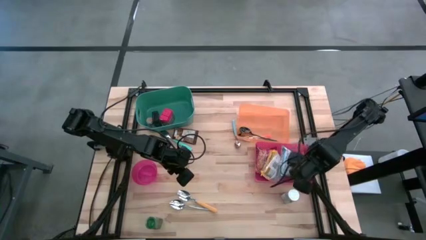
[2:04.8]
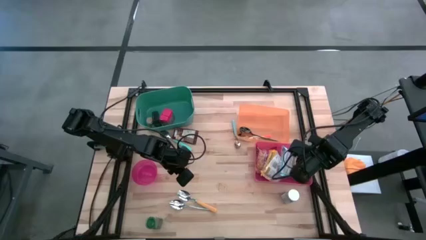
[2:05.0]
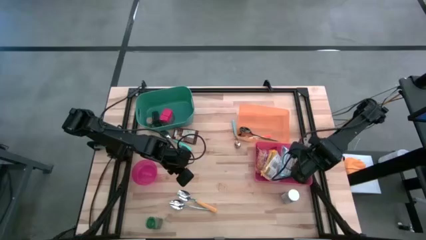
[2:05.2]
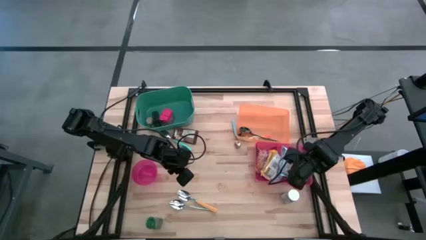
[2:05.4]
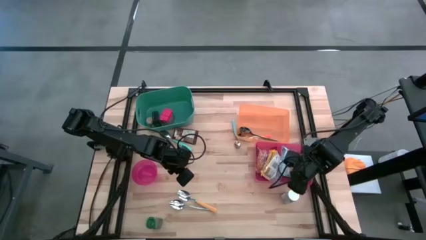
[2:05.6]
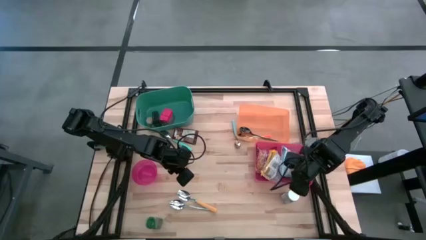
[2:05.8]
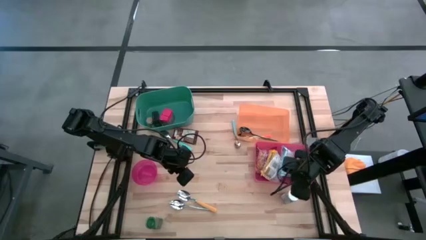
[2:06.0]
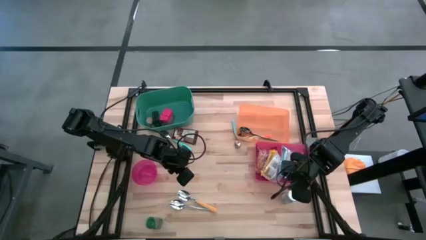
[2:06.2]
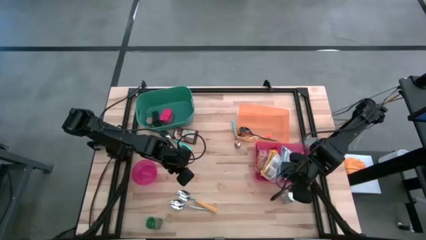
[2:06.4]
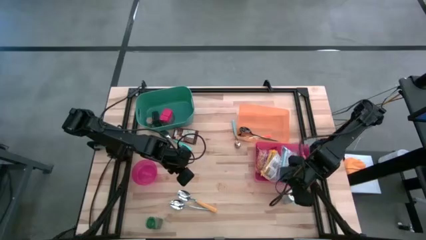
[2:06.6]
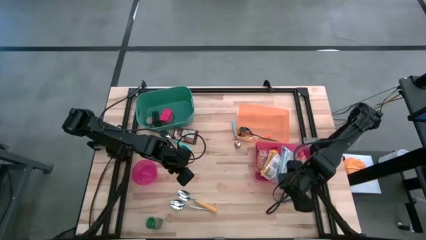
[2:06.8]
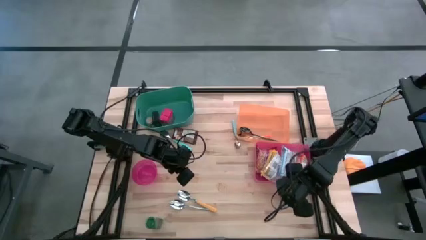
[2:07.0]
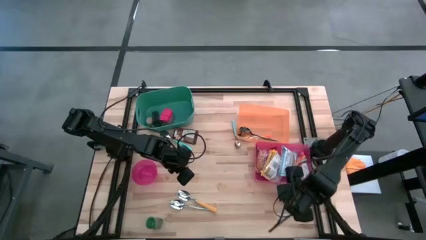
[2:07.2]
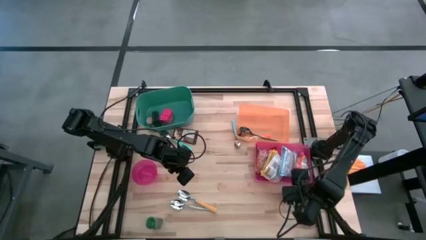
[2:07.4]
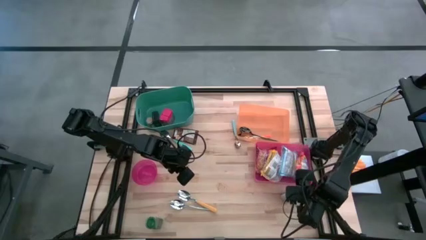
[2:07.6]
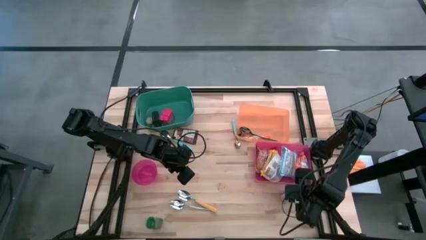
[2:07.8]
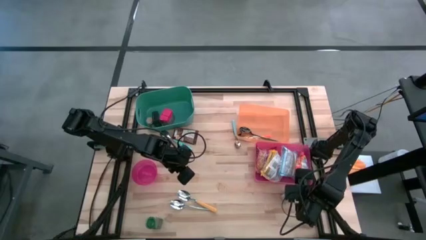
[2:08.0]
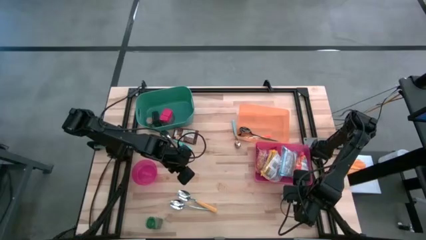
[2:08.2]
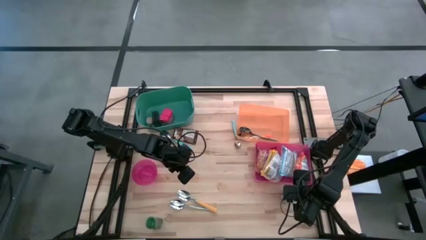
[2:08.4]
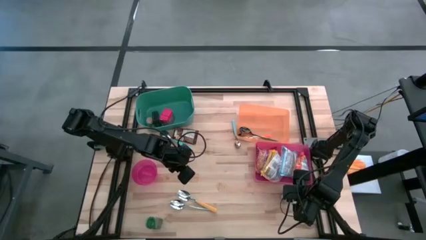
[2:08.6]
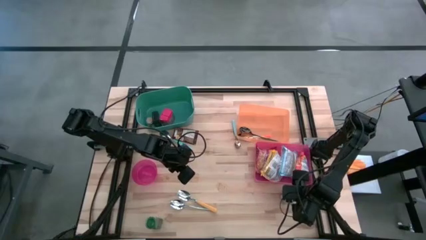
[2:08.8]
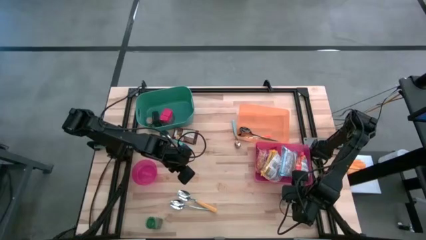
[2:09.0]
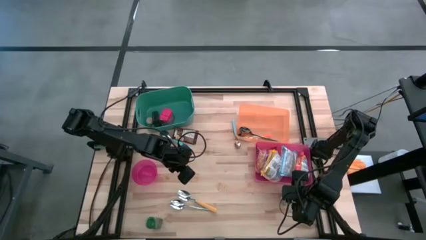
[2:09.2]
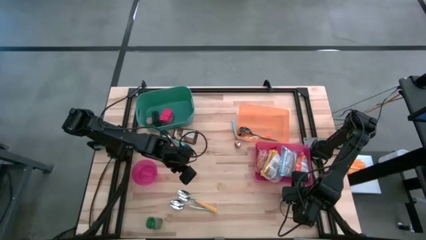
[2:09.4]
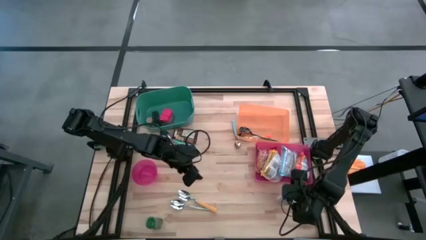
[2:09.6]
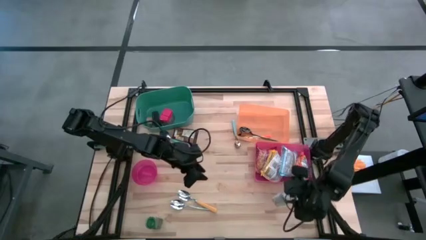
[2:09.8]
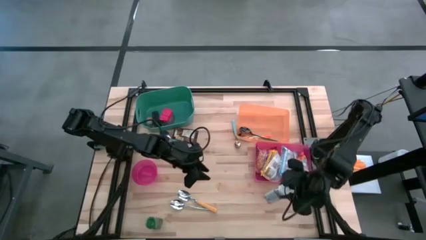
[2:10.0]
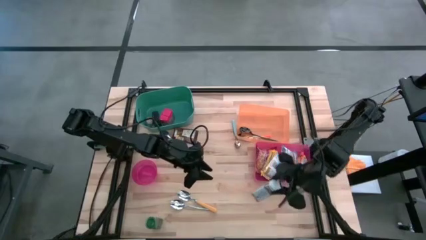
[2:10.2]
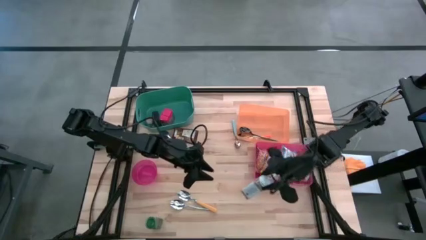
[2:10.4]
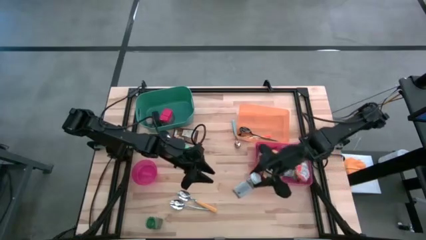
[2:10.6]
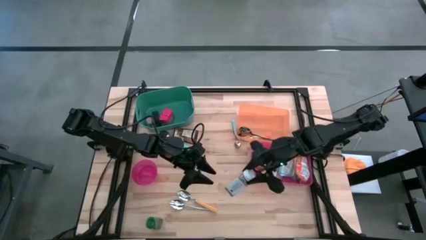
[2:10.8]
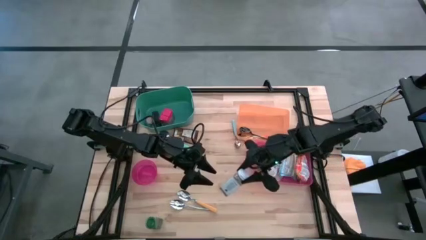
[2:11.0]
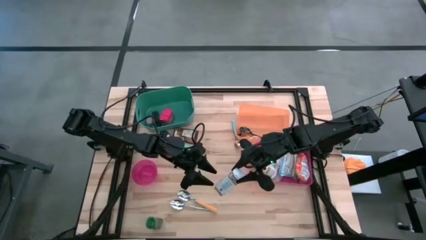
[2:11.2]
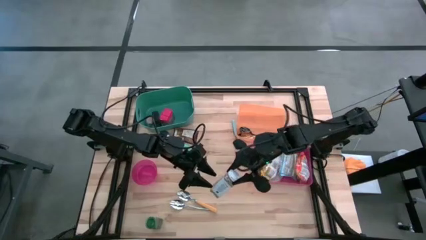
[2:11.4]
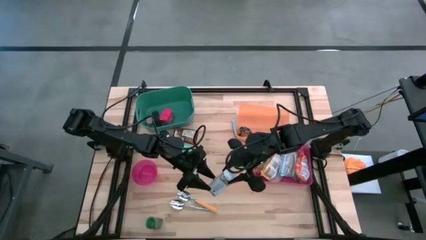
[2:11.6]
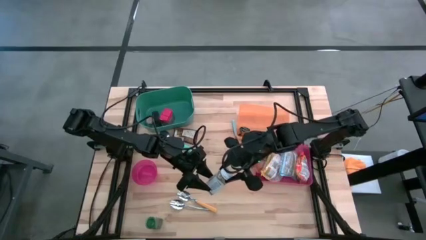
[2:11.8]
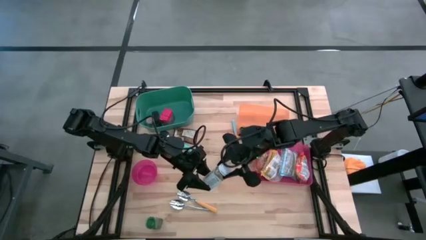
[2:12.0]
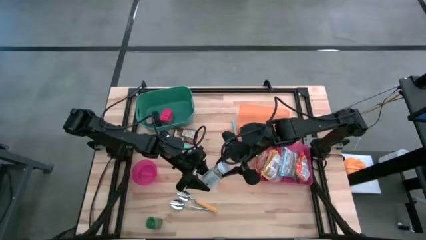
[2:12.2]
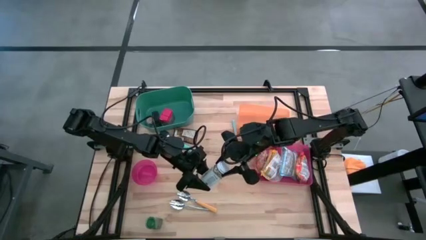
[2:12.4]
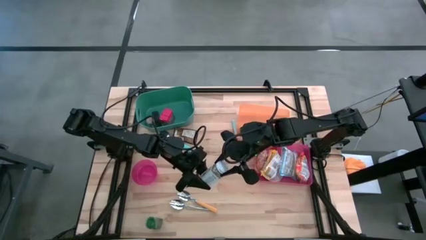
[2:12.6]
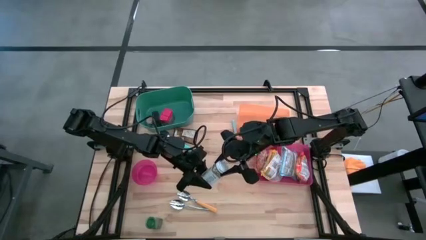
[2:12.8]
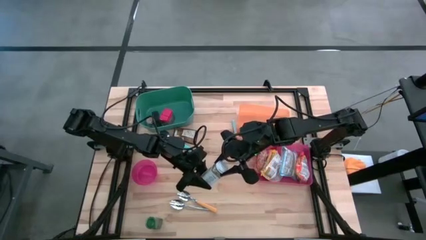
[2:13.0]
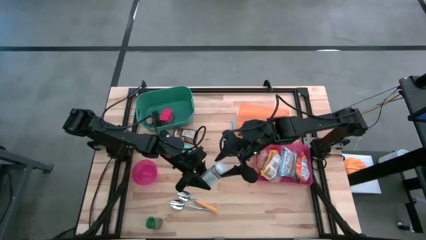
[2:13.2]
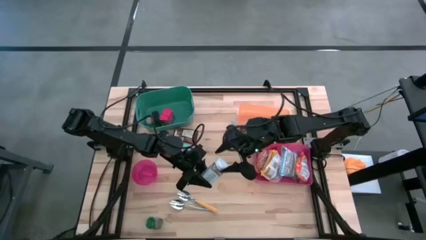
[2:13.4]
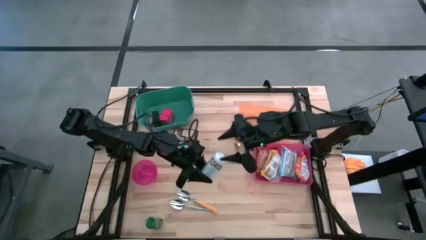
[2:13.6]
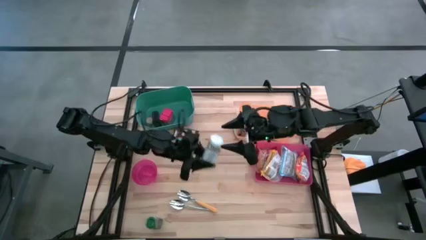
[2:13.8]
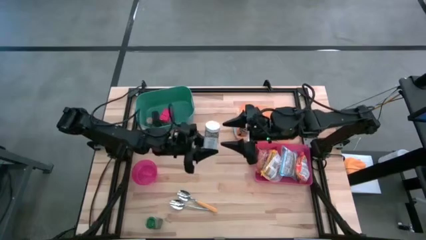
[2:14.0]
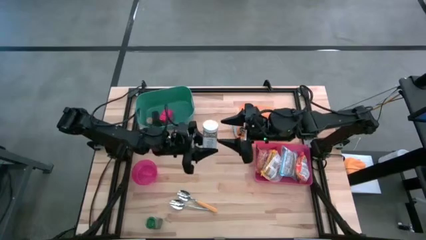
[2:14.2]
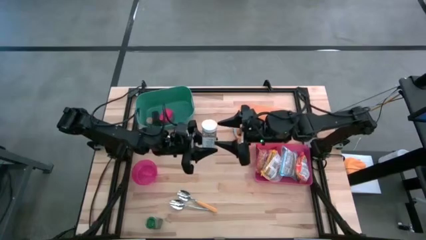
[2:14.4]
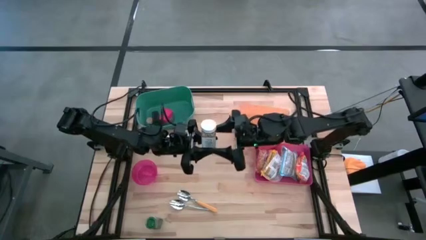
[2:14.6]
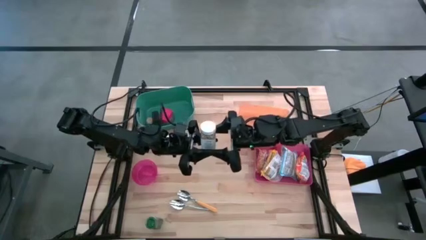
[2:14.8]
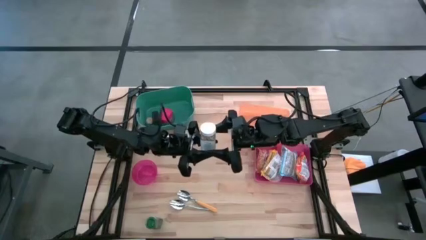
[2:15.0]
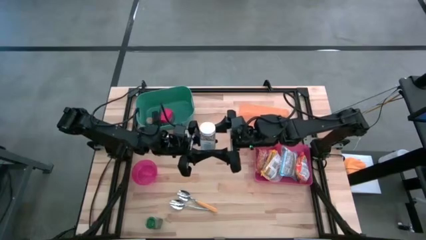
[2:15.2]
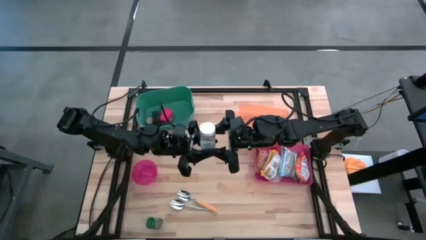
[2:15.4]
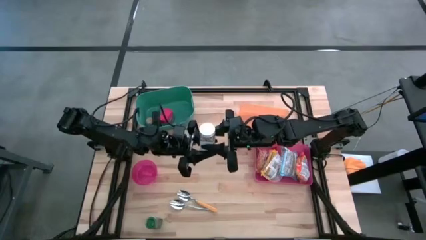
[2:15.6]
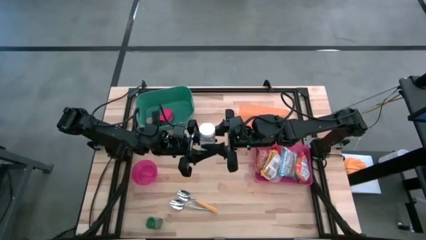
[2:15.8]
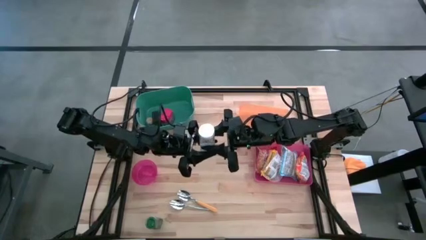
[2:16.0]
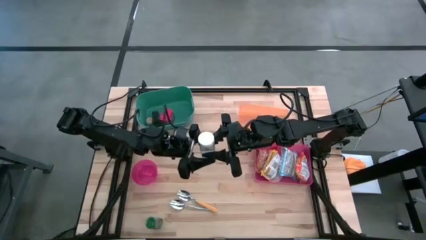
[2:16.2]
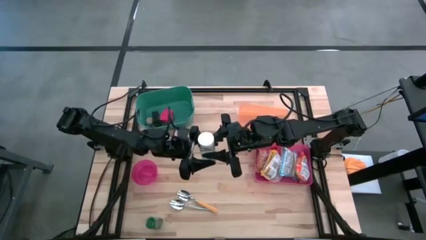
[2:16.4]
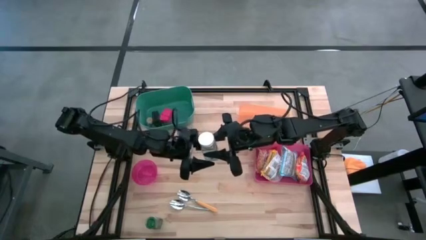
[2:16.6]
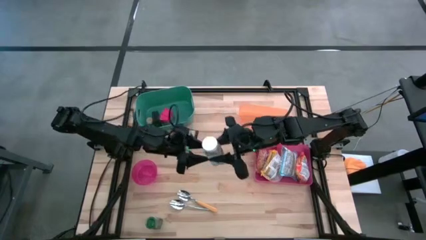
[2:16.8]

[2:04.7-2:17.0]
Put the white seasoning bottle into the green bin
